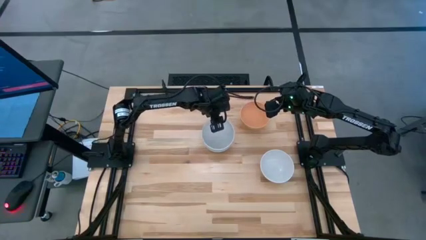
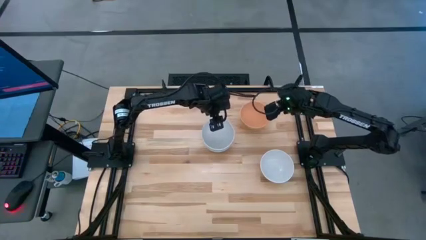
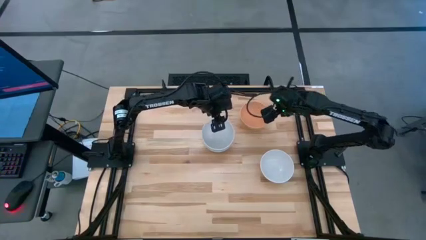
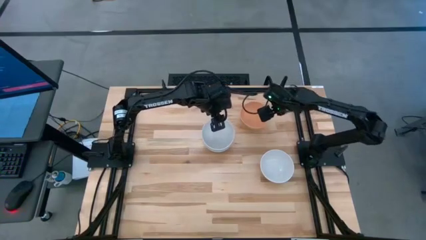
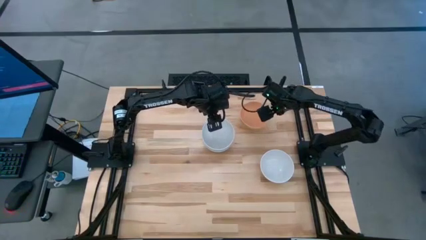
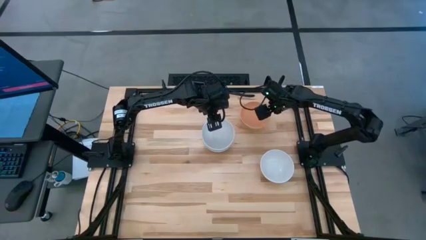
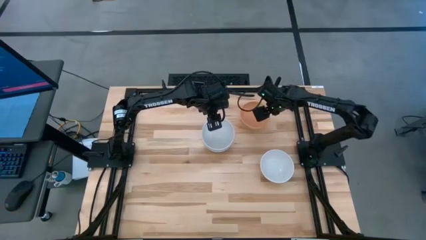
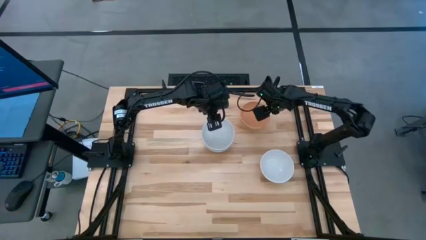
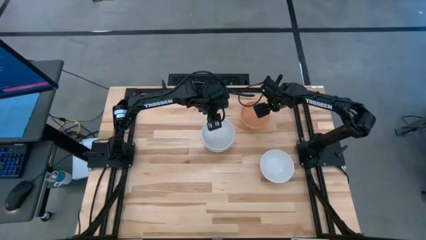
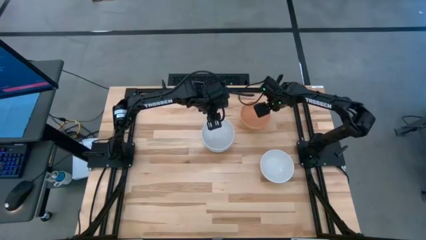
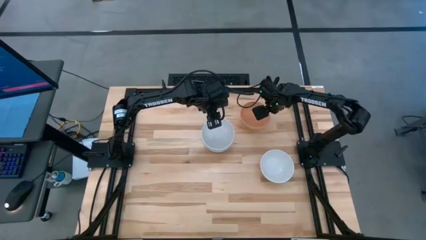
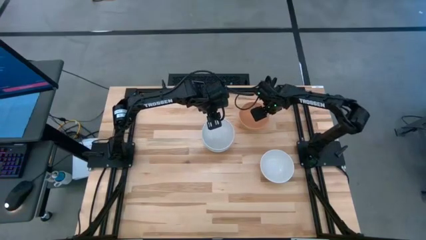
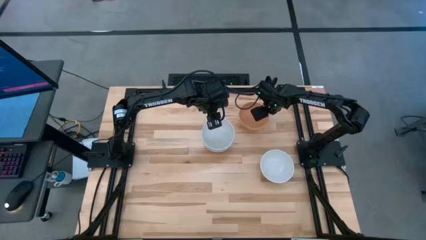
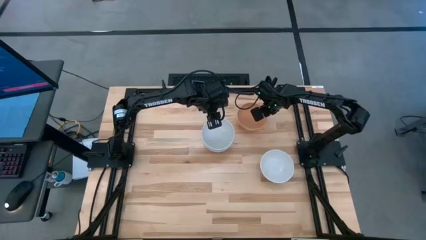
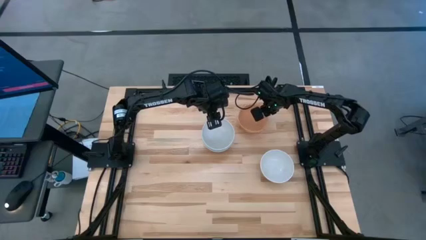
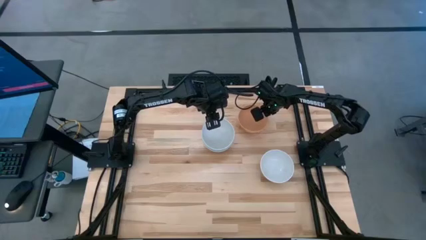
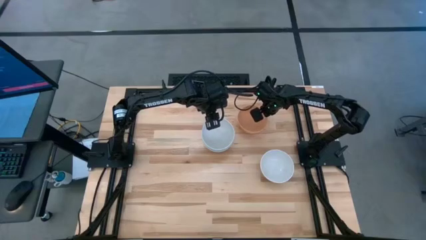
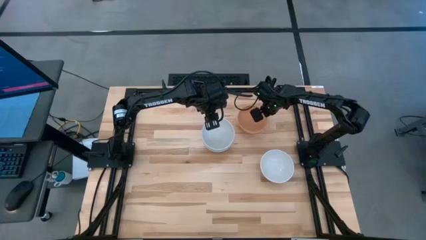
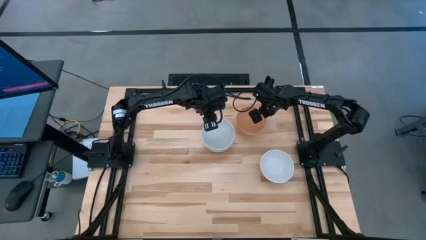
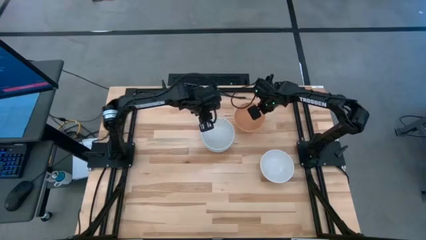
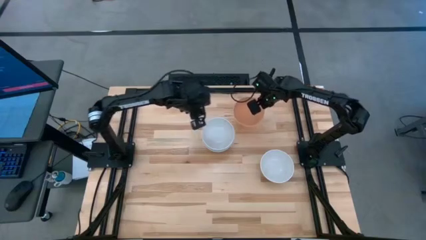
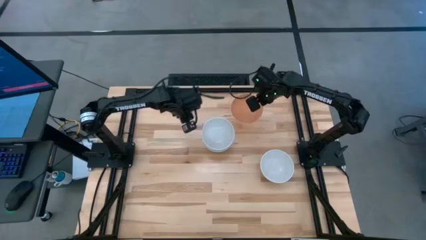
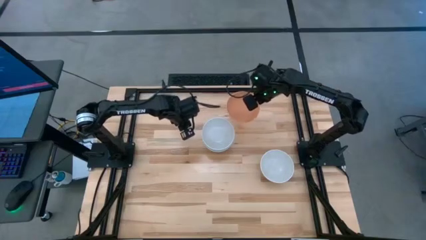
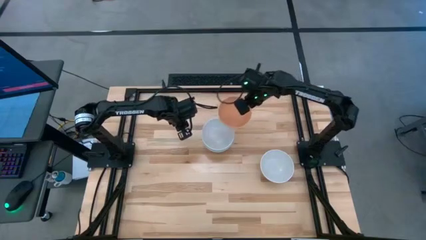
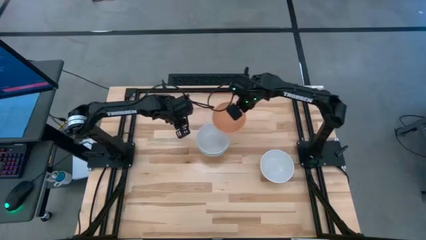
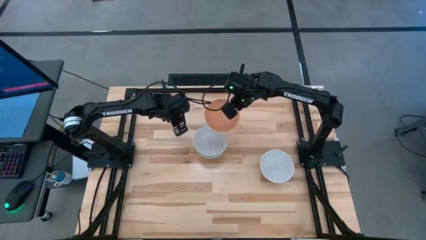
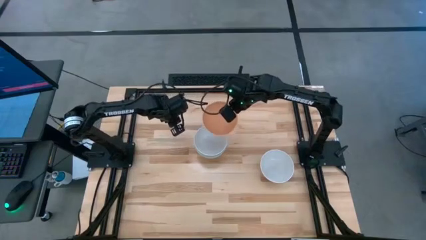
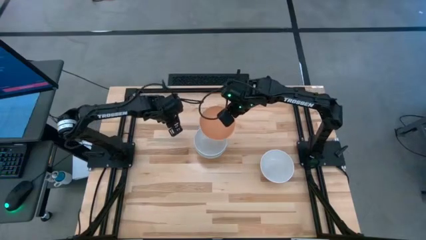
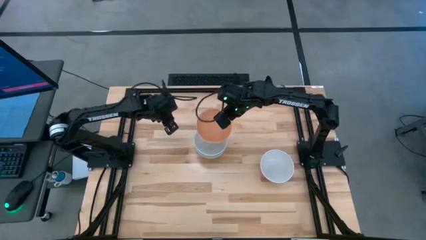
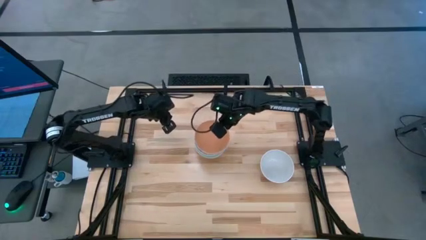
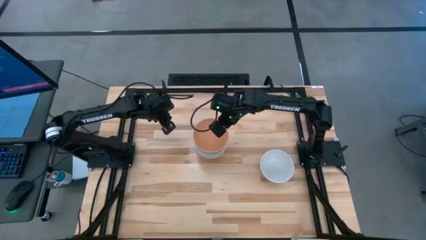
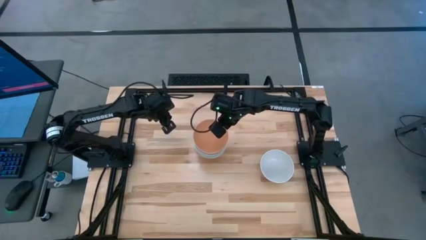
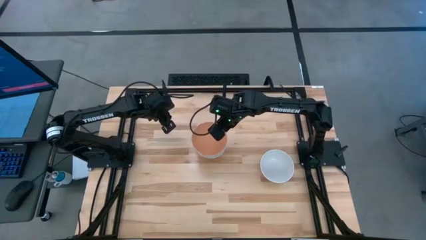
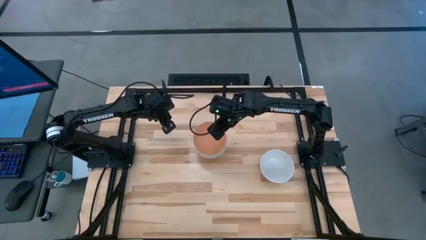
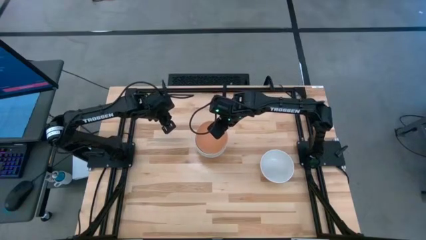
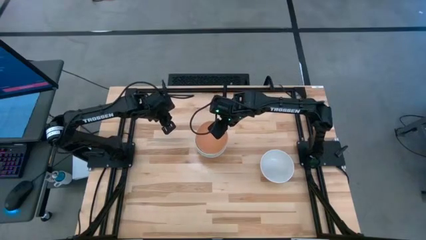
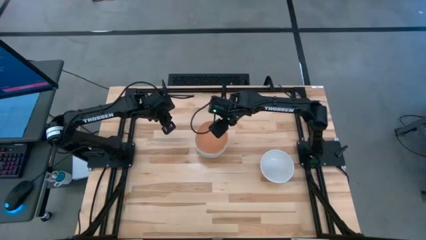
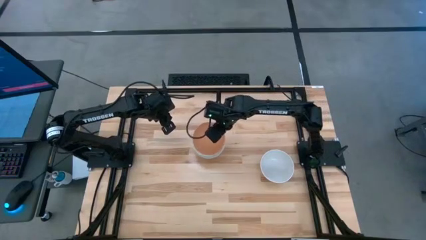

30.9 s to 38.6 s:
Task: Nest bowls inside each other
Stack the orange bowl on top of the stacked white bowl

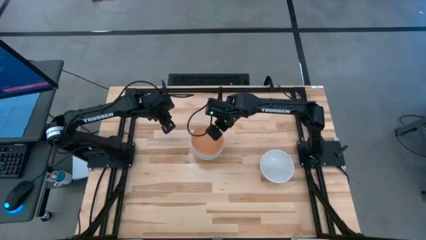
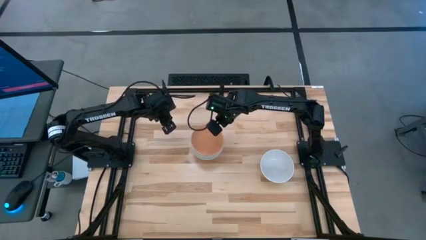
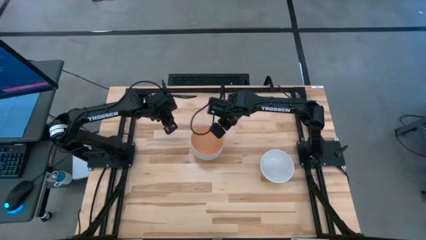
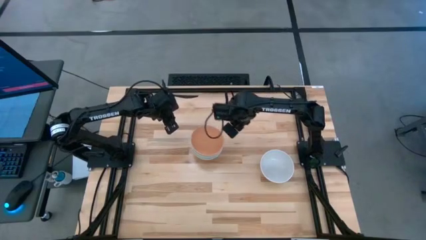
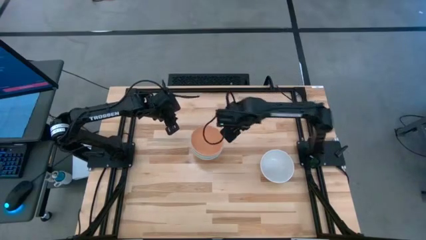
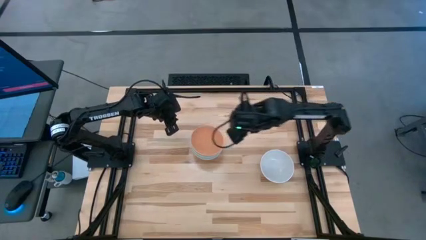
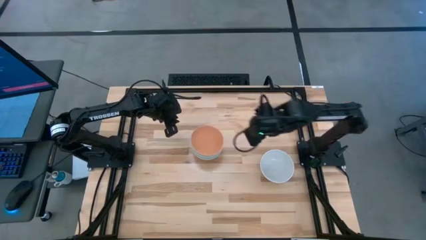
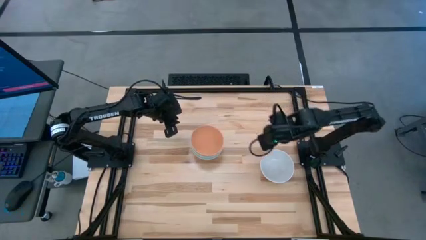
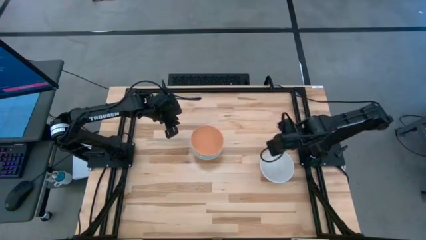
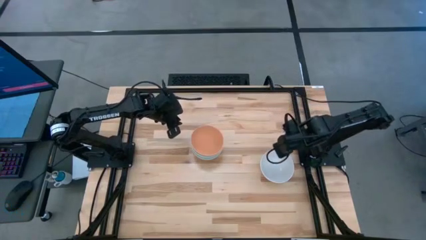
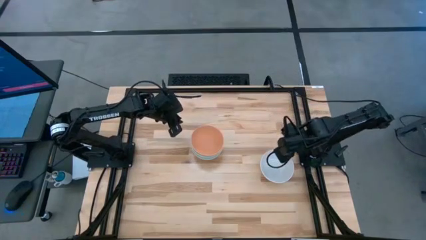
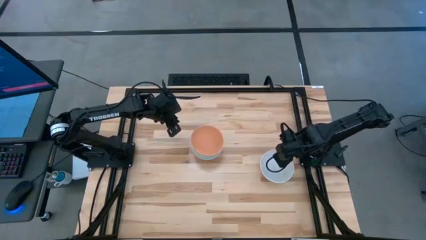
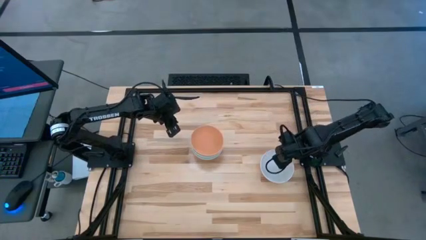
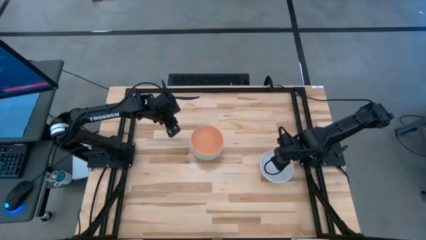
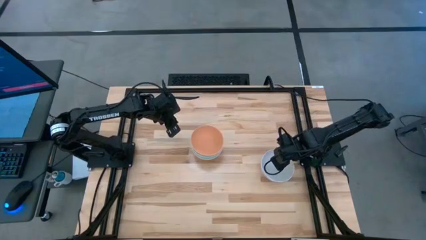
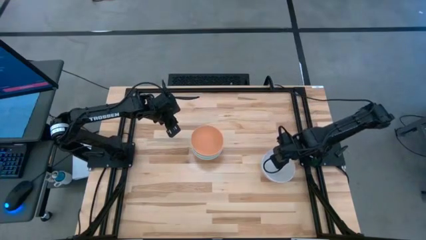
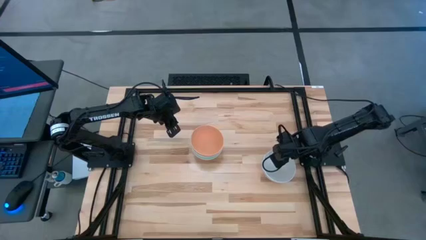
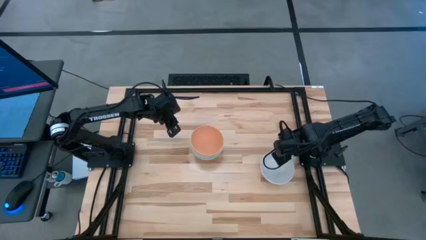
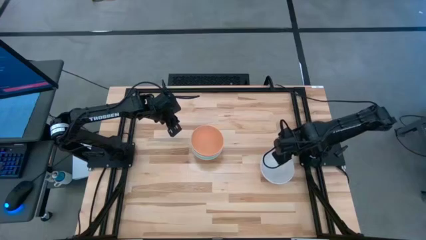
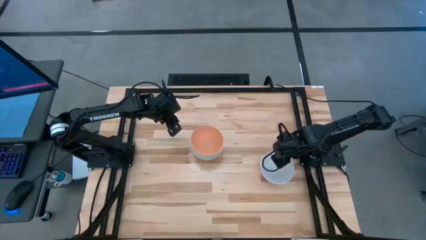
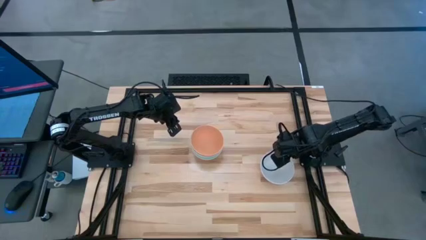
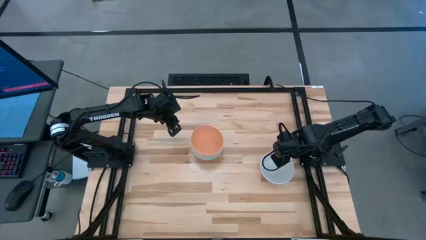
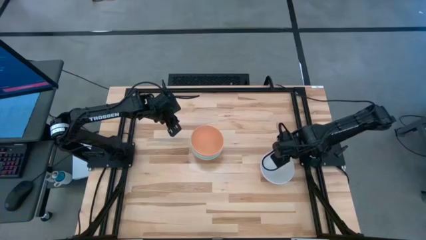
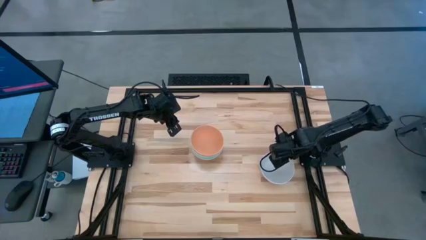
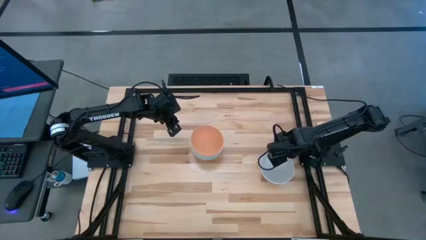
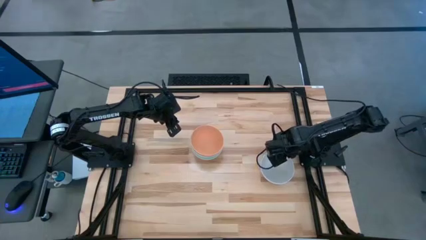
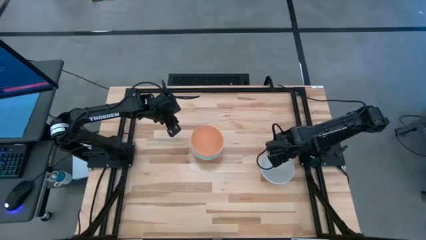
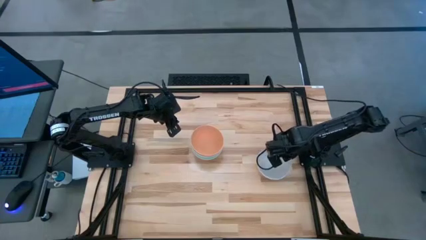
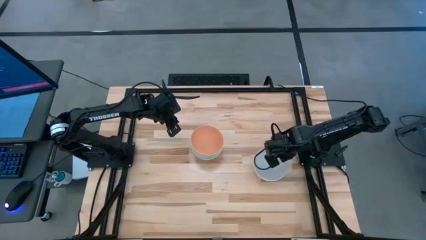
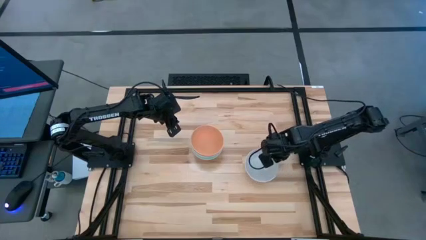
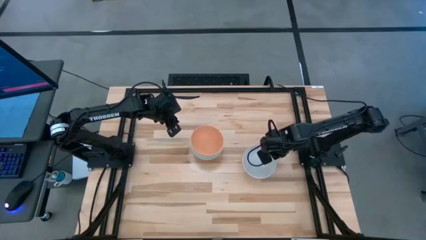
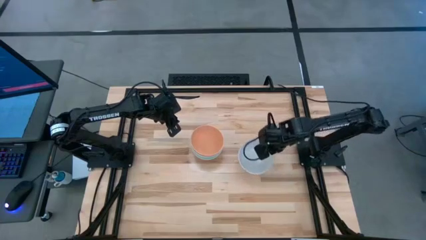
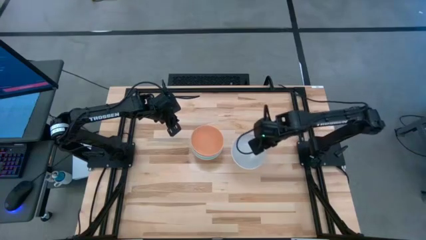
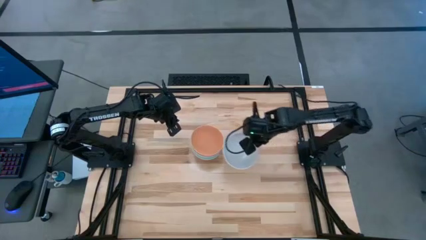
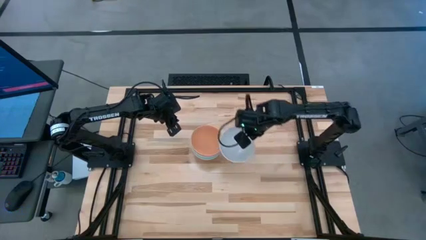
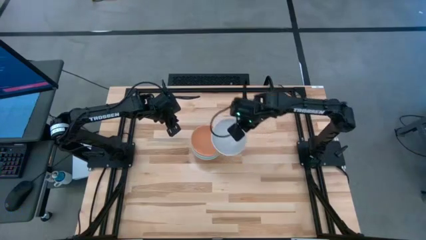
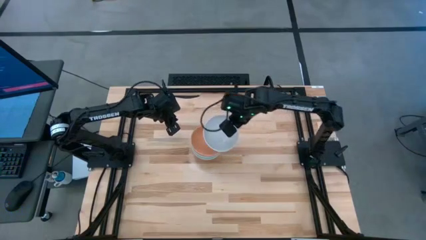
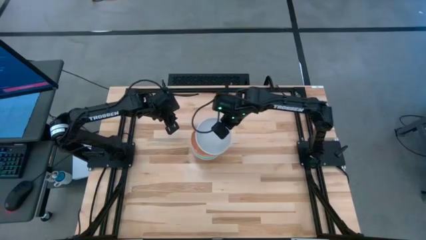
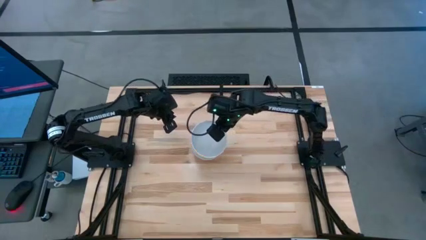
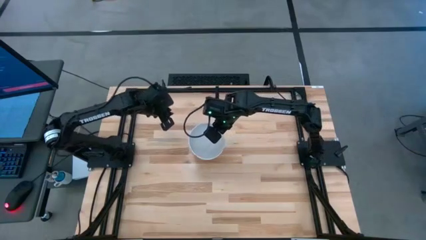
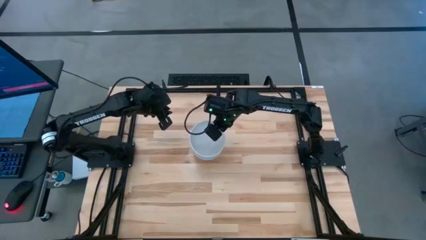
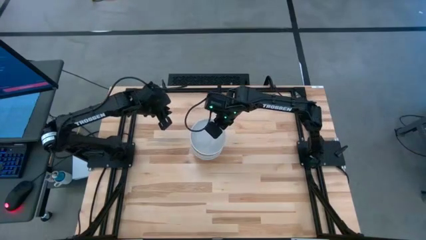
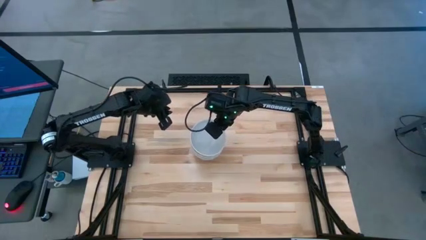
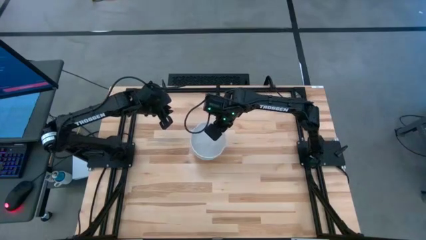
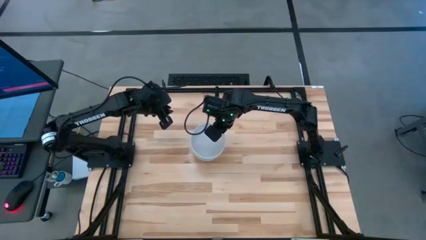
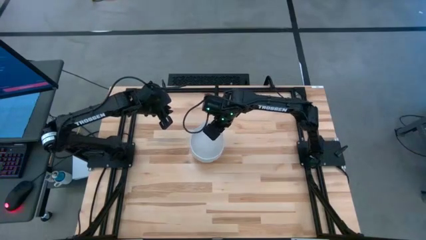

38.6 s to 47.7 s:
Stack the white bowl on top of the orange bowl
